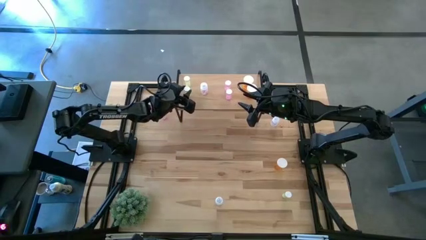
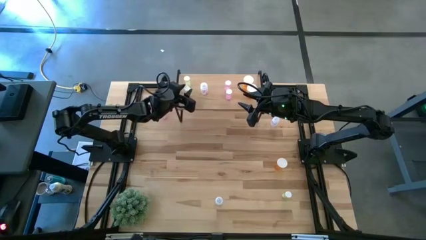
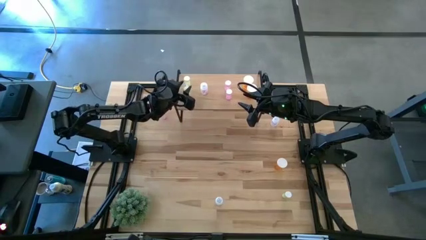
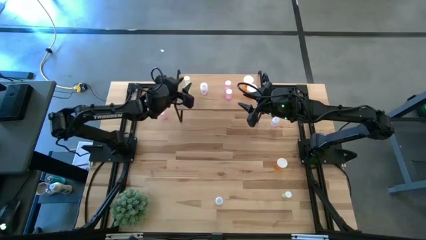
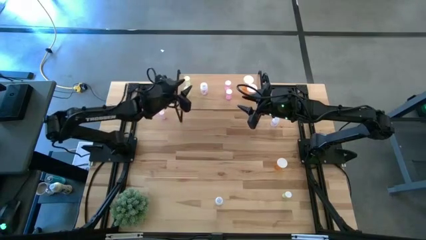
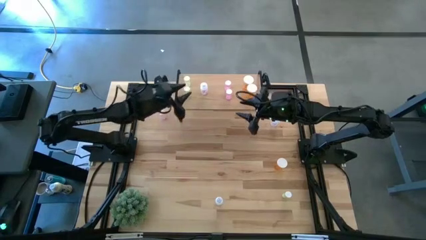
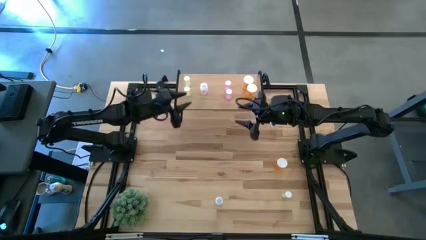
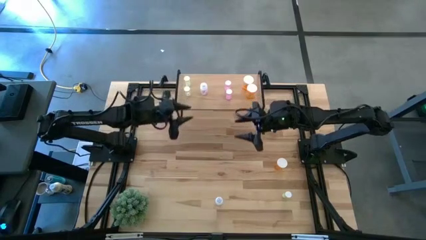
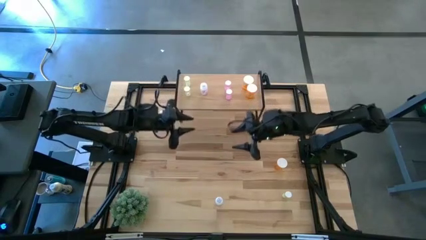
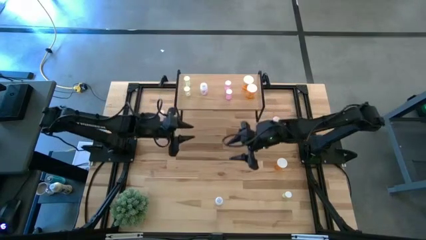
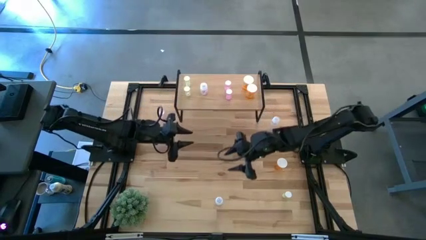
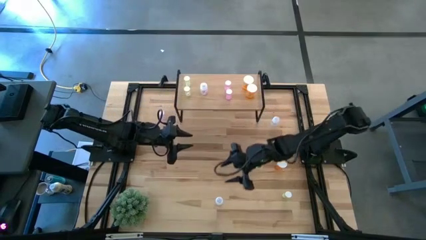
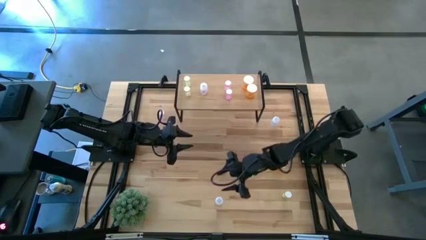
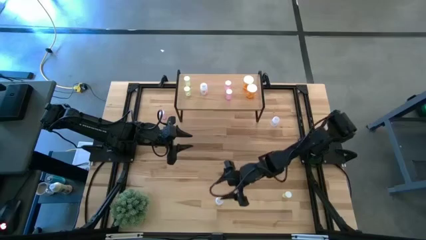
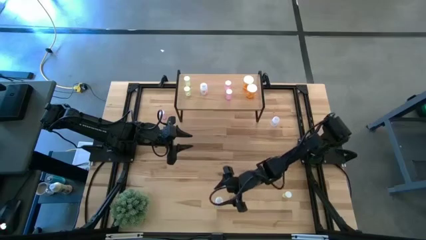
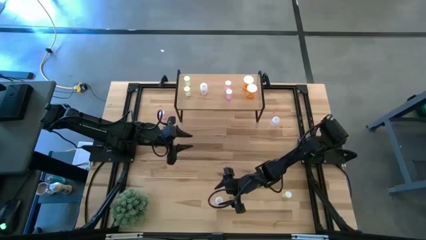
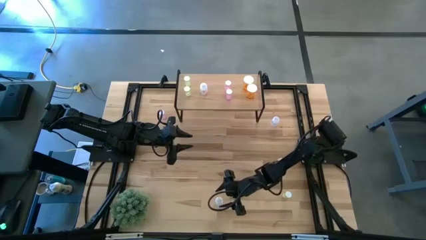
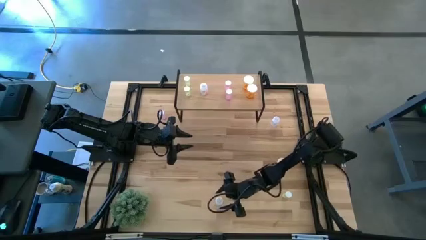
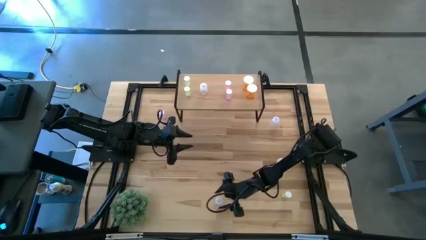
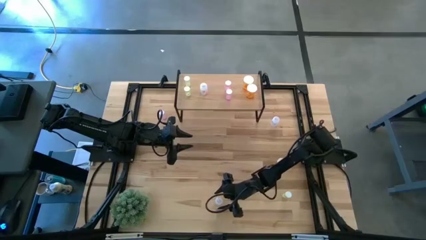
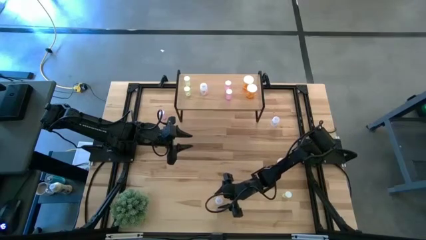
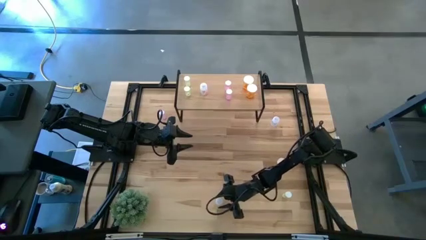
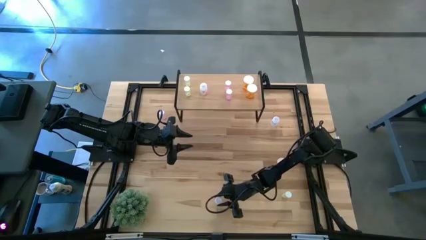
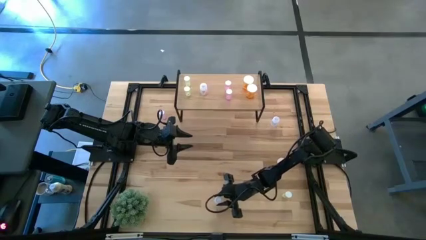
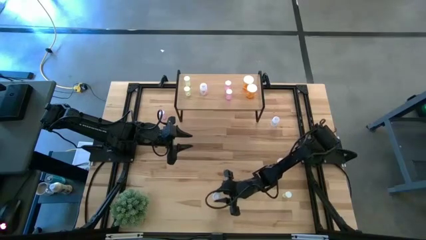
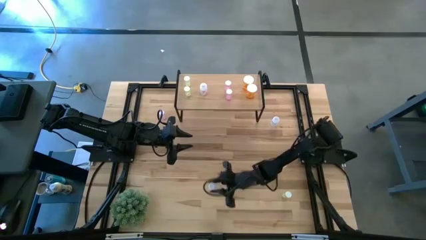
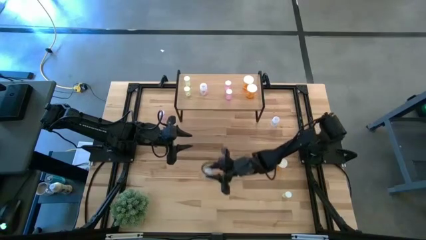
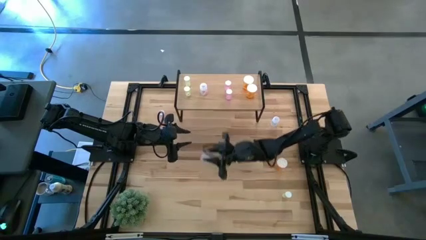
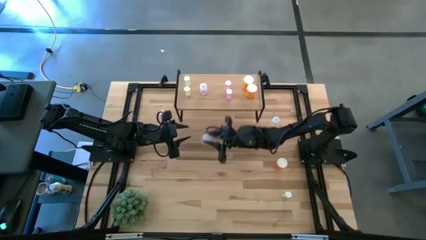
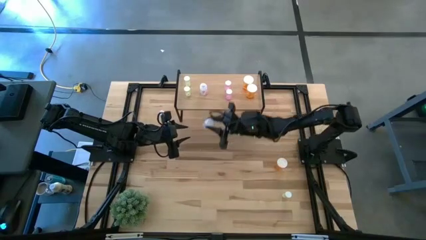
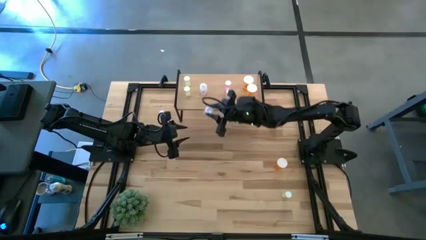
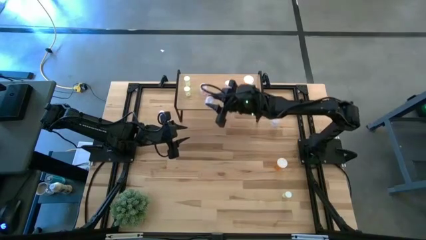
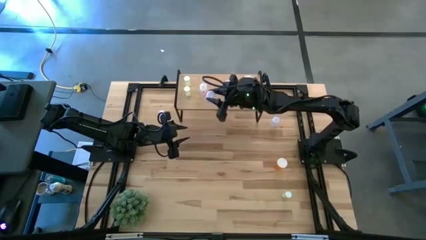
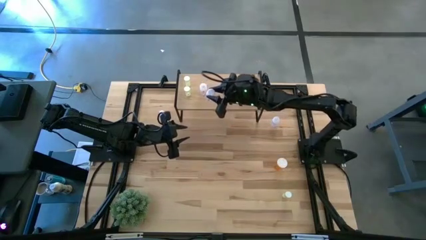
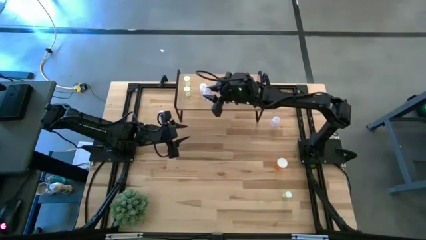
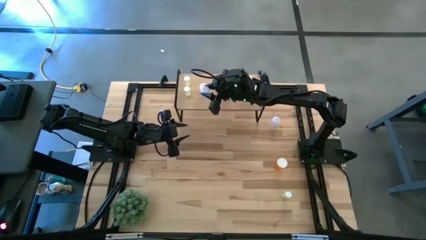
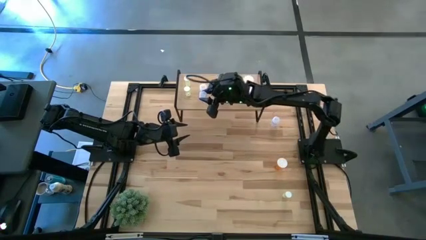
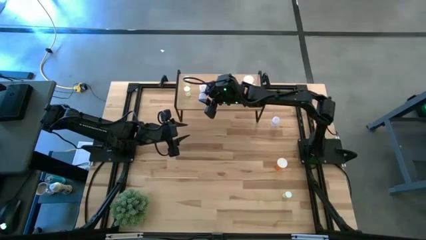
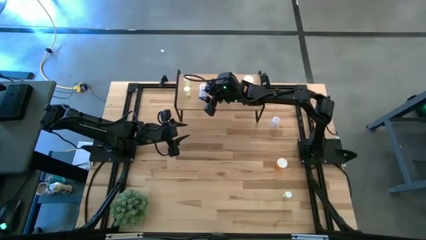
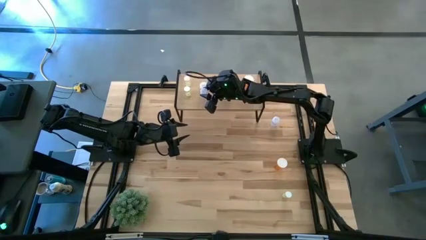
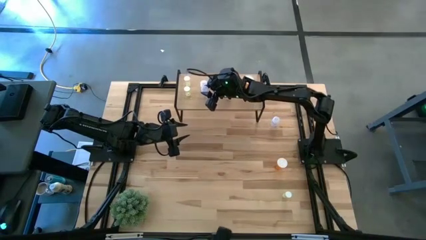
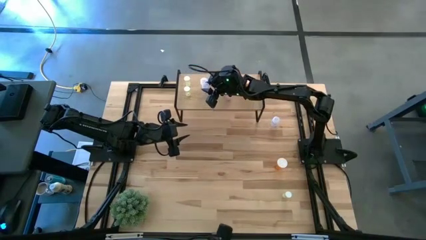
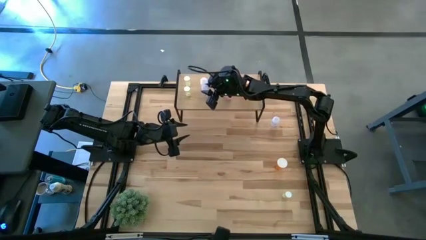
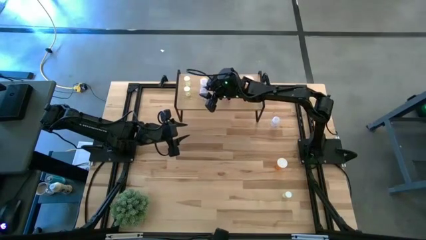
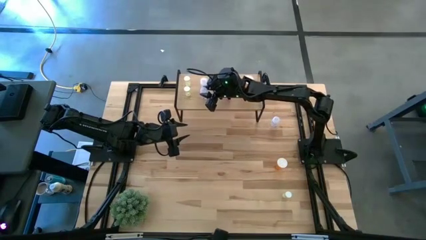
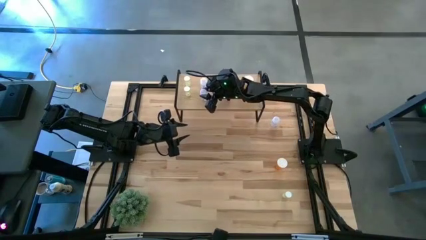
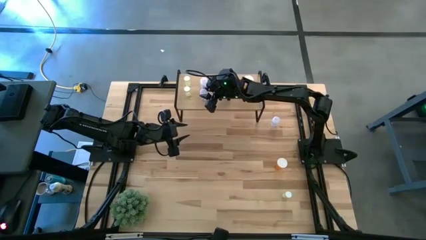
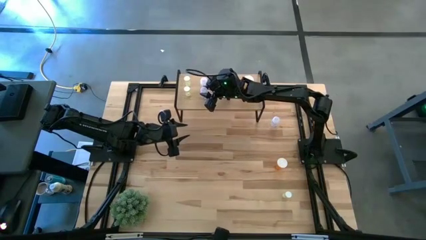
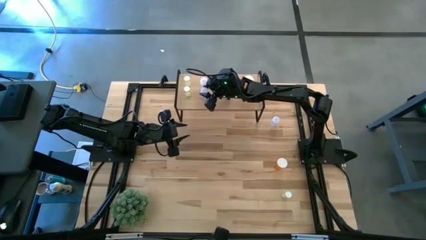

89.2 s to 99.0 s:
Task: Pick and place medicine bottles onto shelf by color
Put the white pill bottle aligned with the other white pill bottle on the shelf

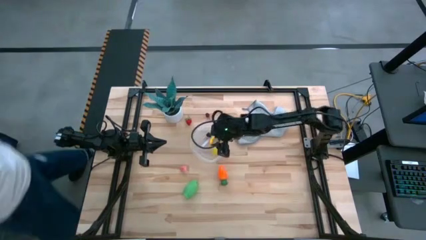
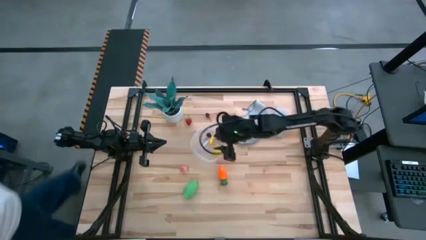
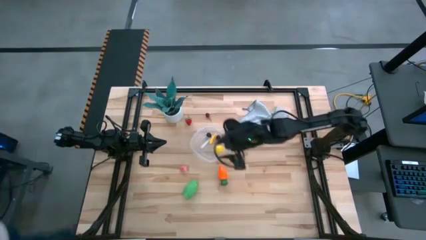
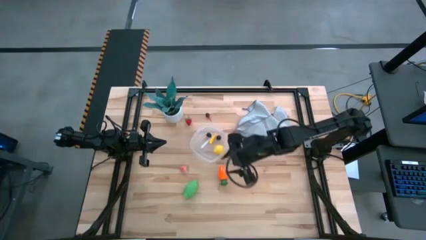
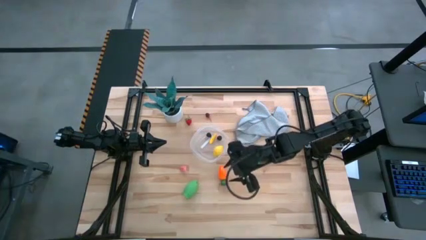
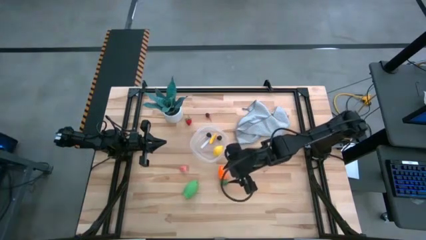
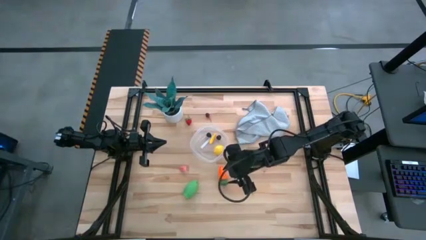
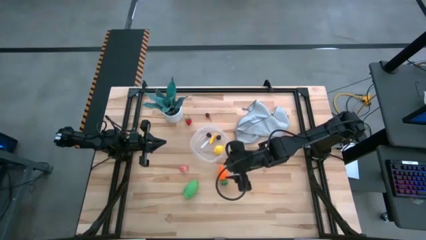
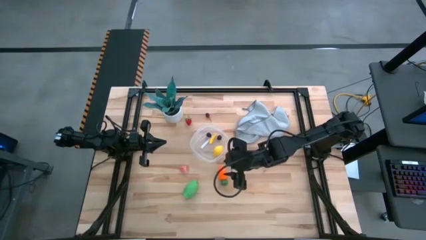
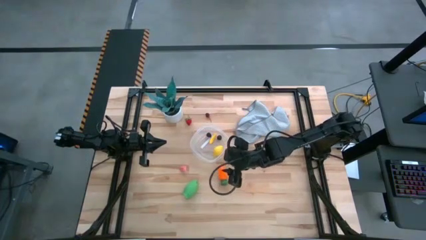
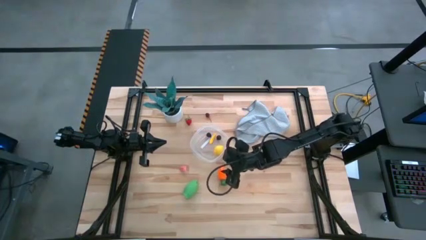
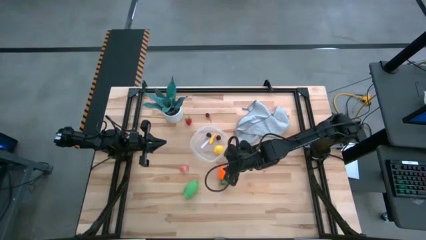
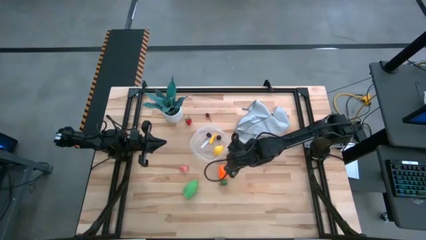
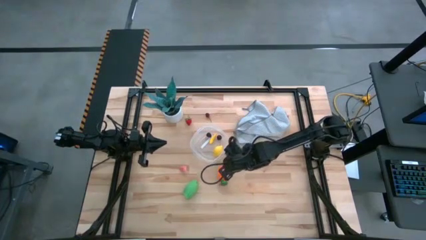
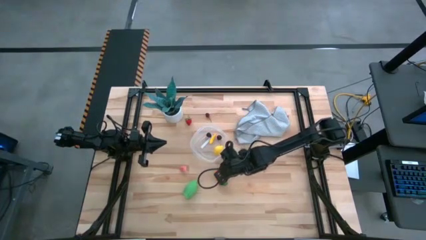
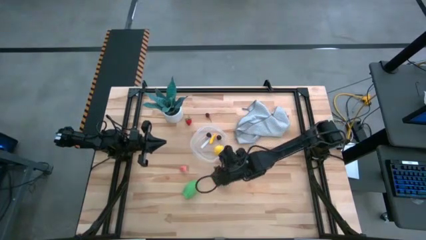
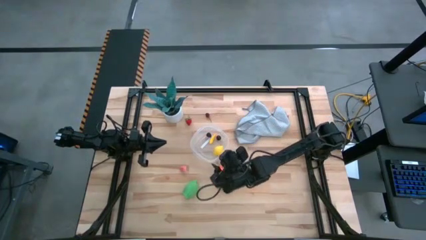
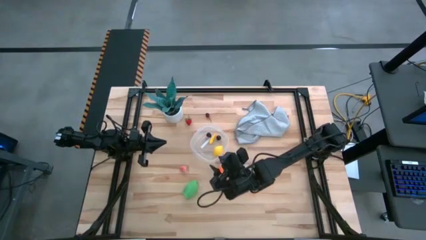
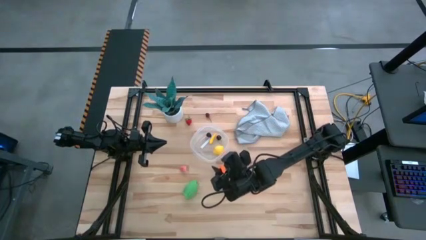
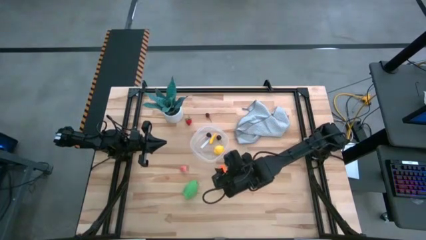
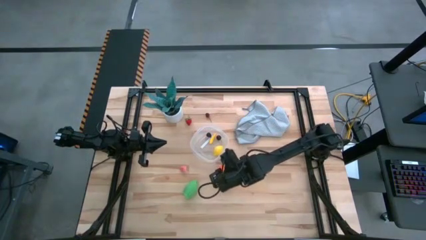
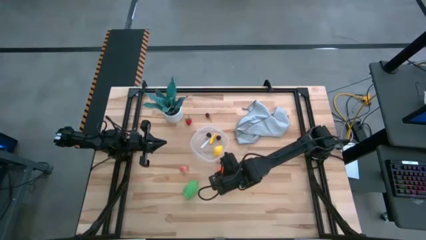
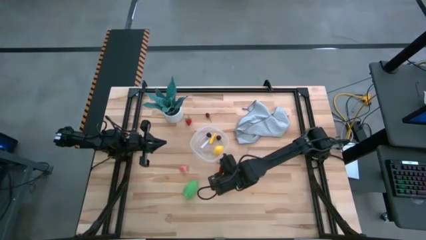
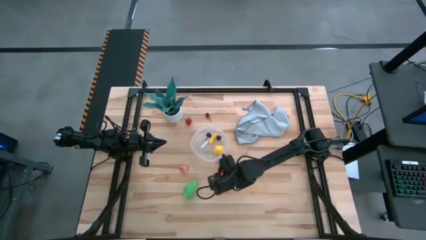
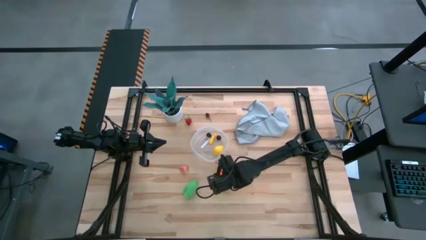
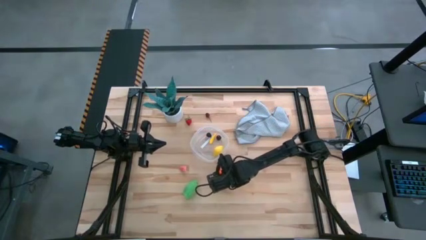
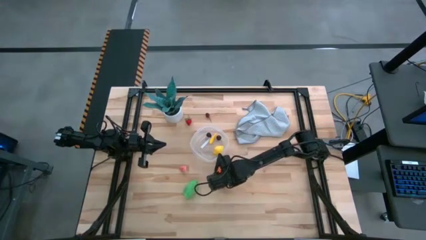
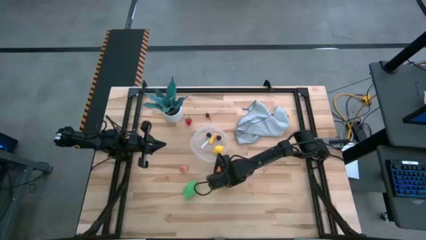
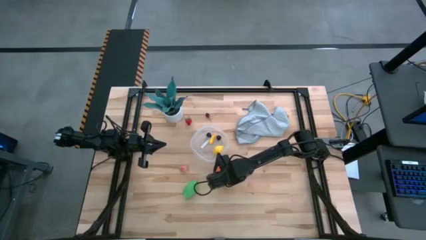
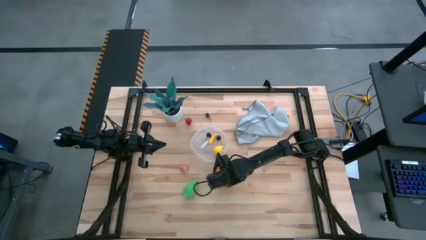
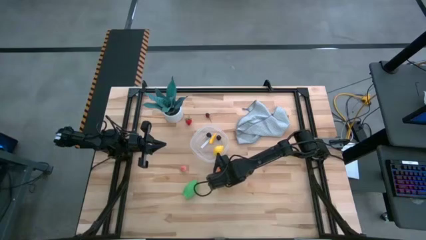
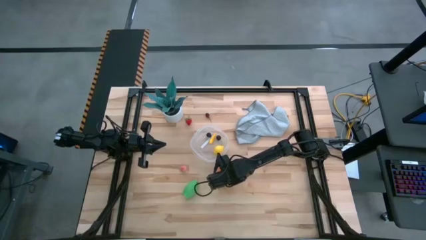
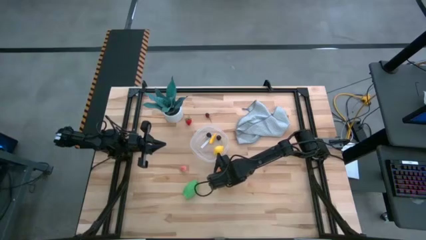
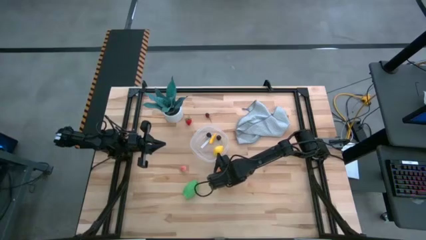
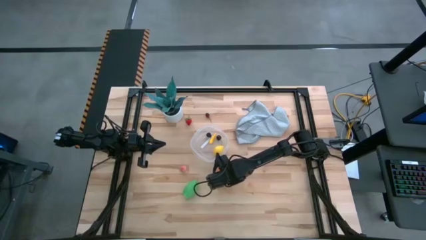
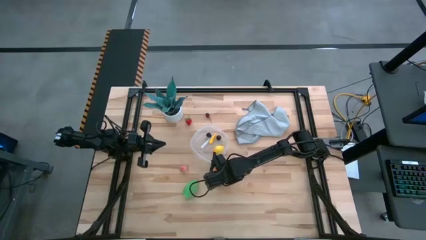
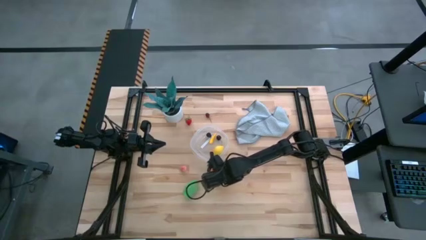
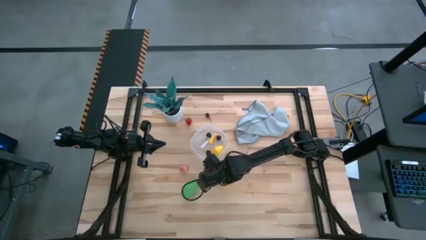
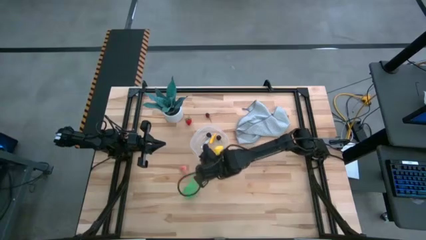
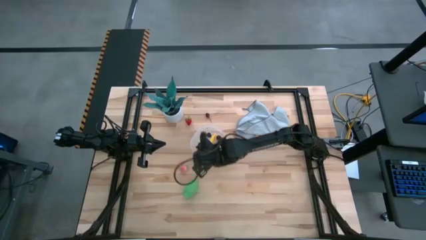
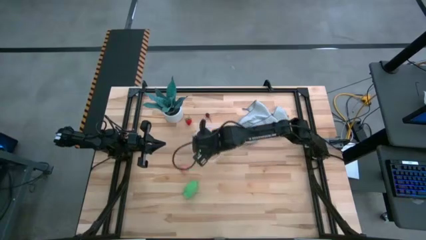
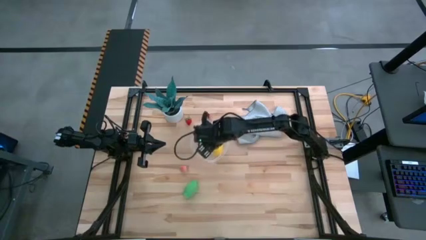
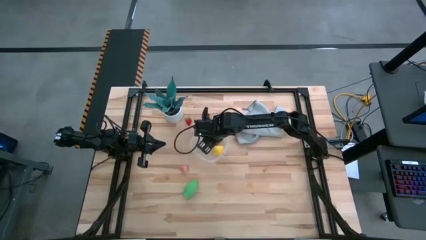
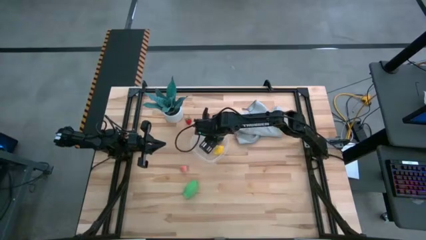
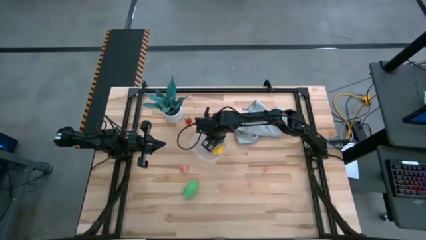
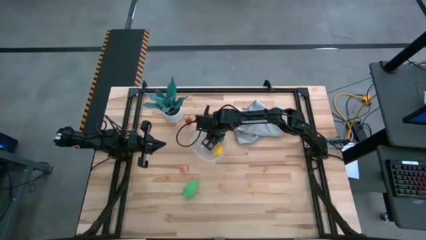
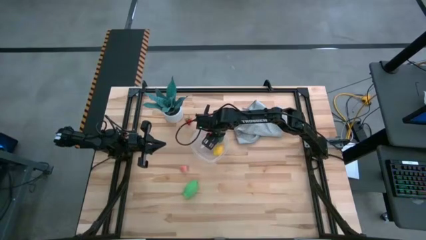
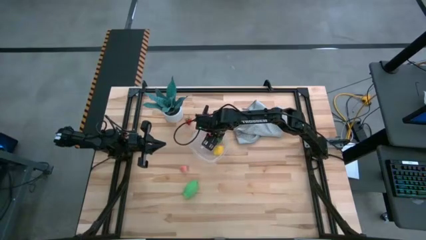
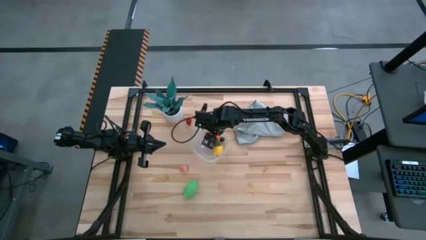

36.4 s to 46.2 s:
Task: Pick and placing Produce into tupperware
Put the orange carrot into the transparent bin
